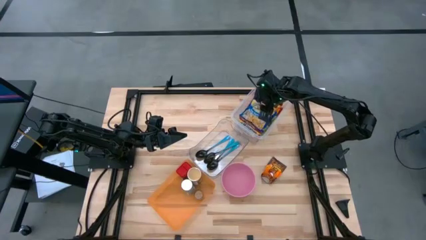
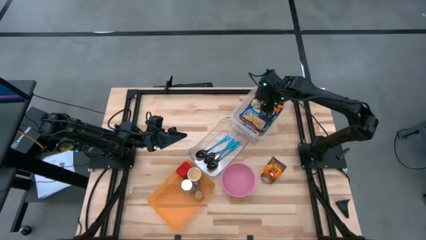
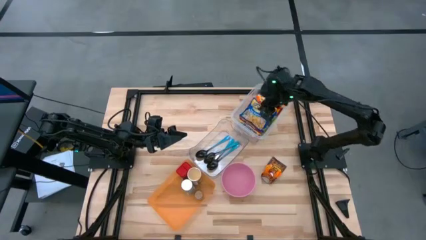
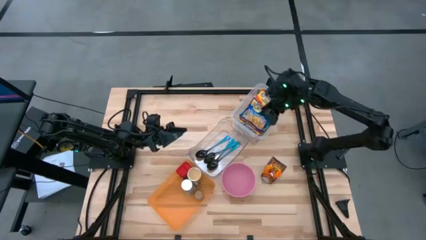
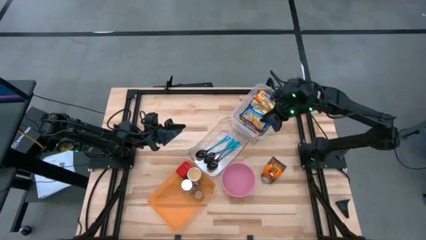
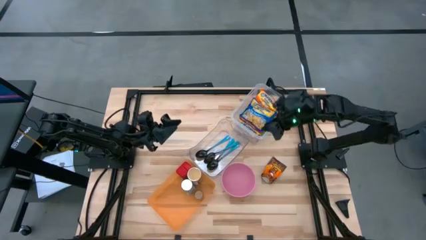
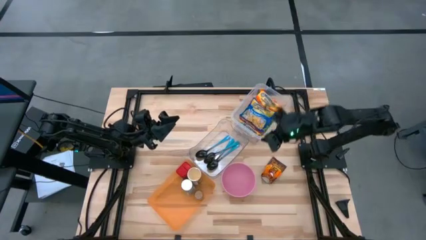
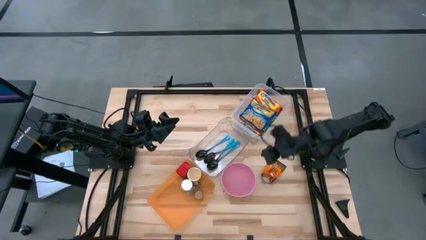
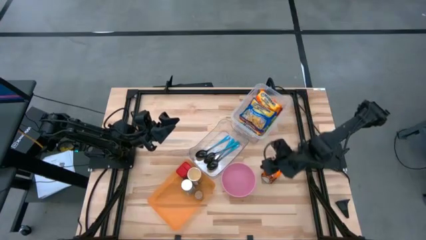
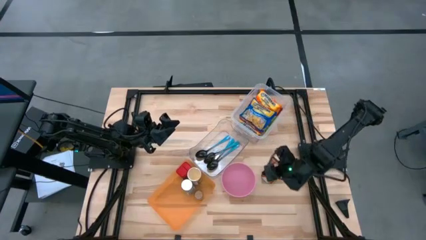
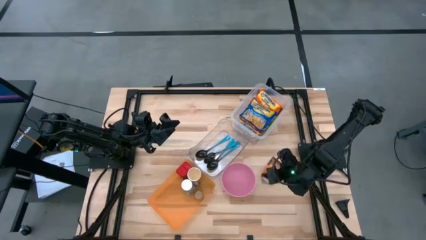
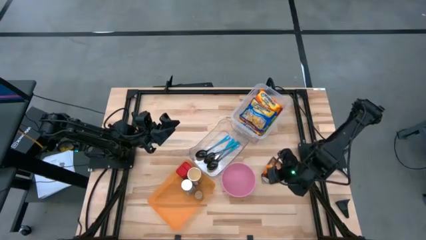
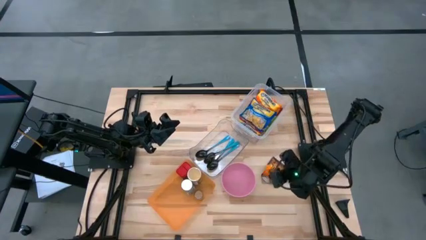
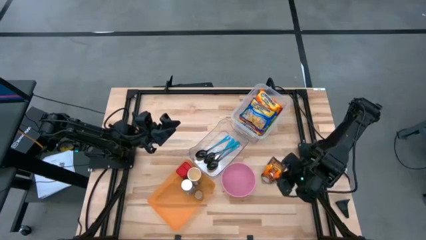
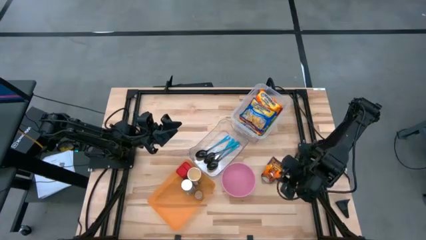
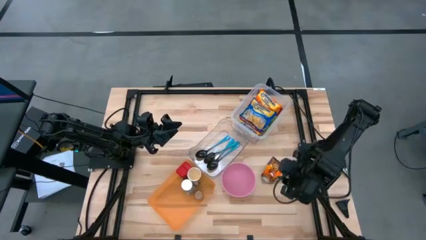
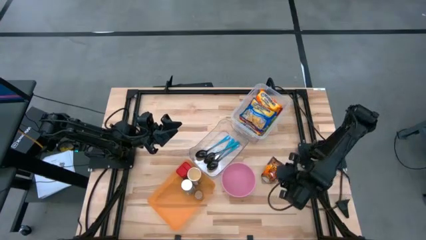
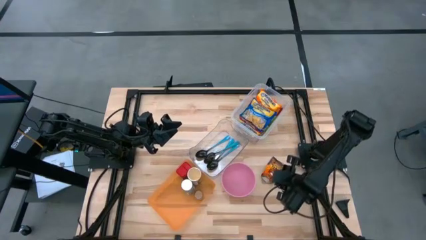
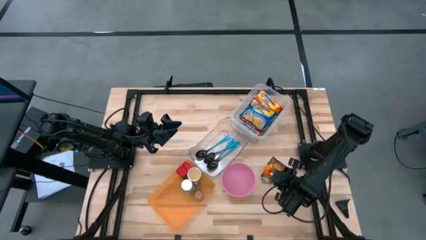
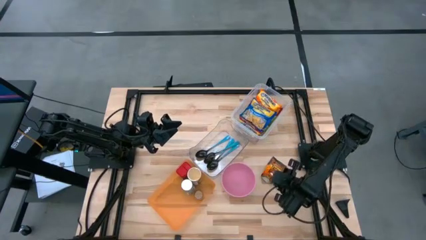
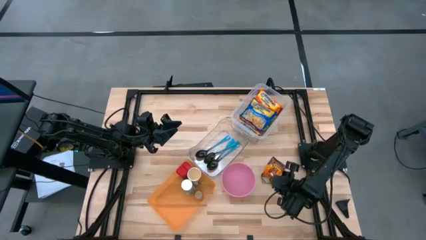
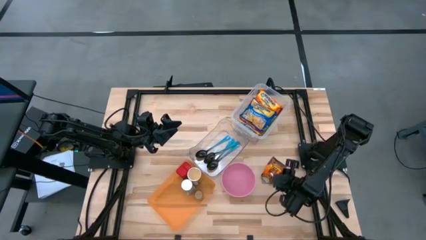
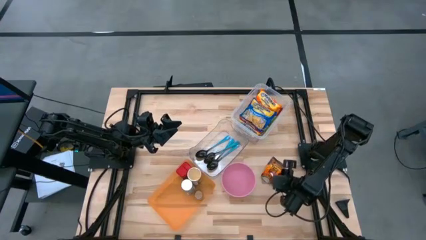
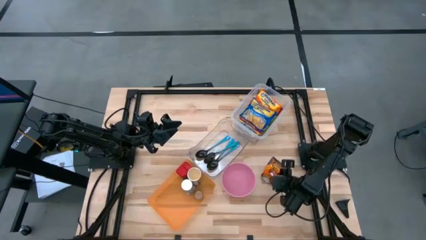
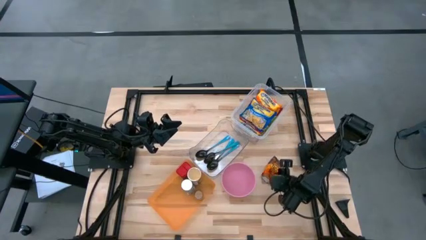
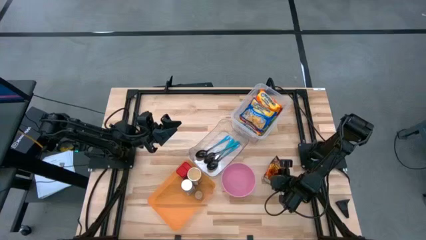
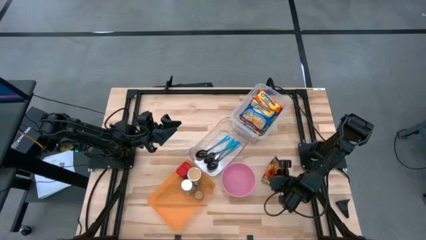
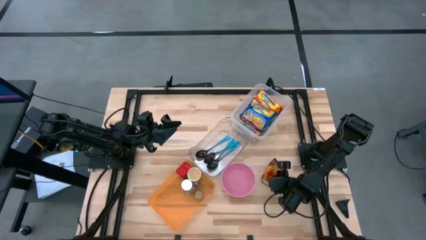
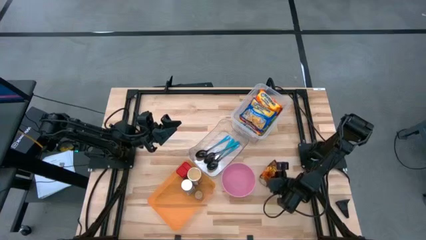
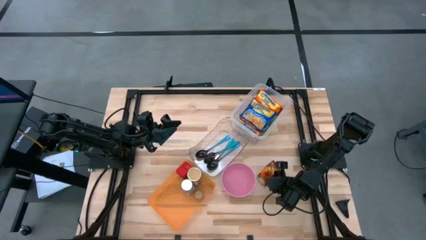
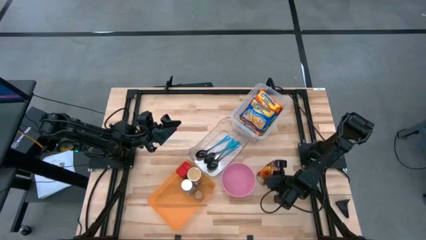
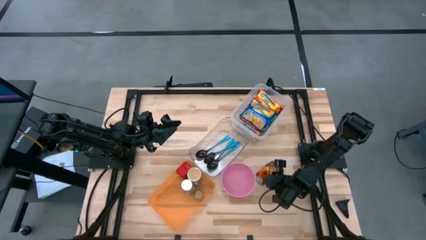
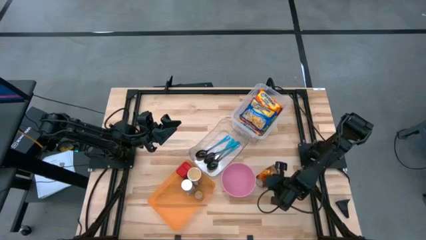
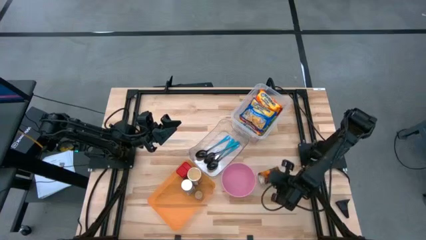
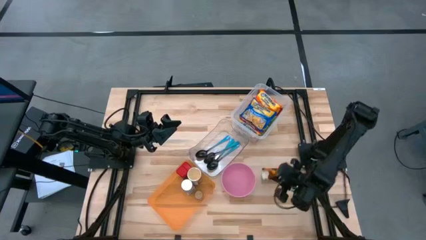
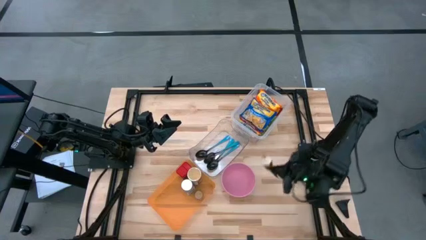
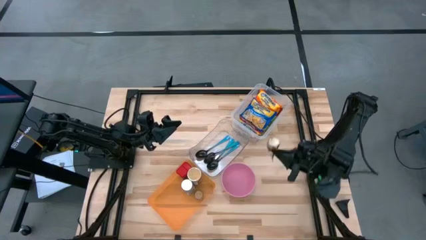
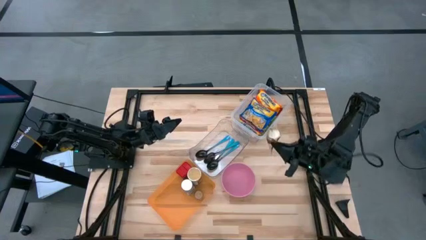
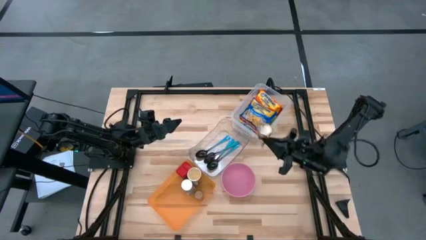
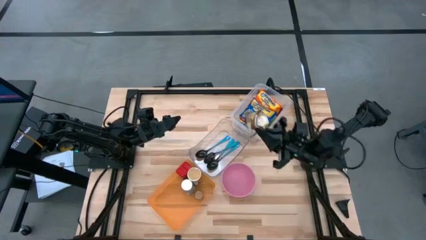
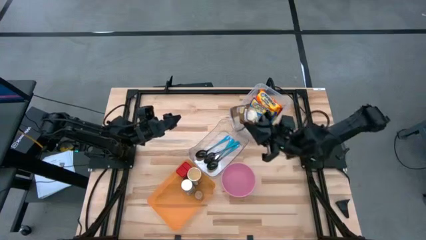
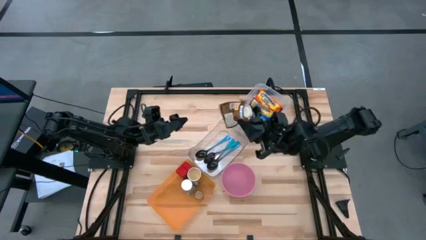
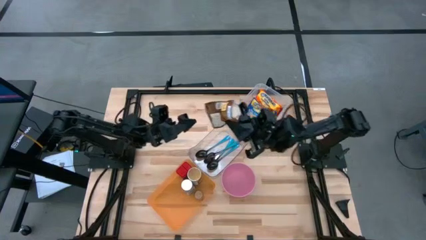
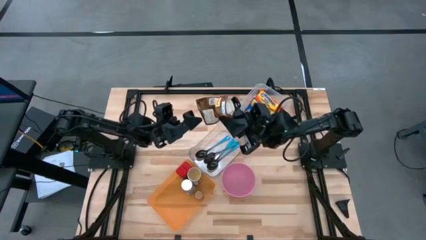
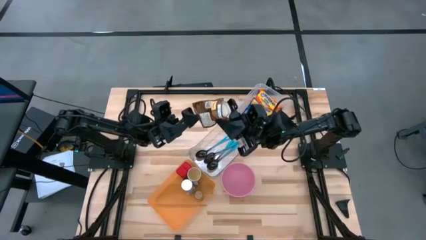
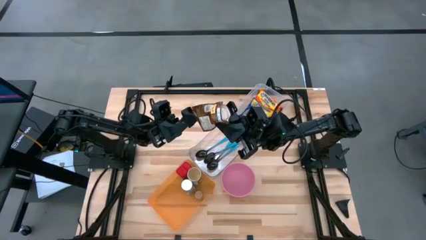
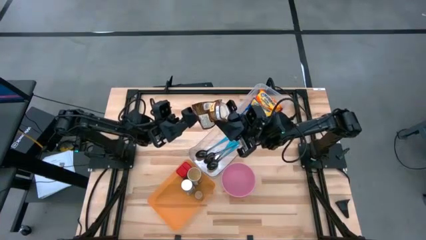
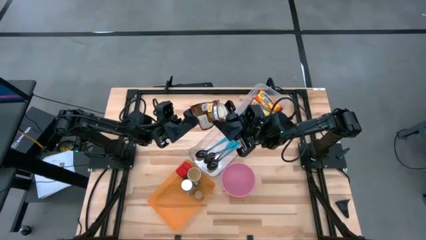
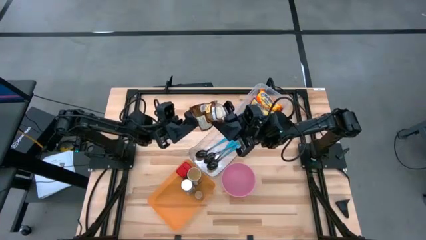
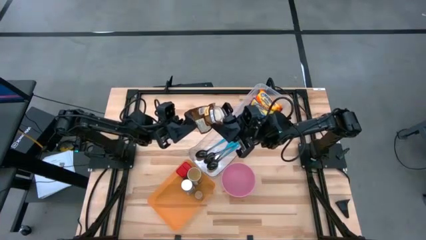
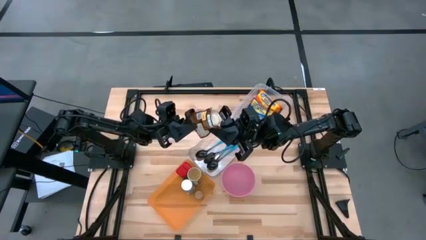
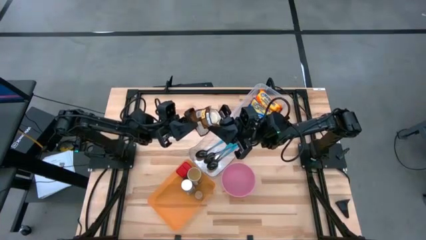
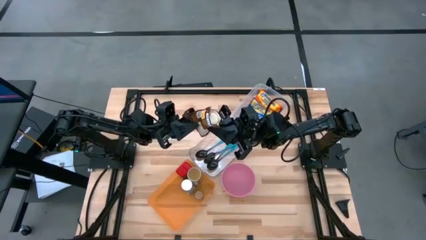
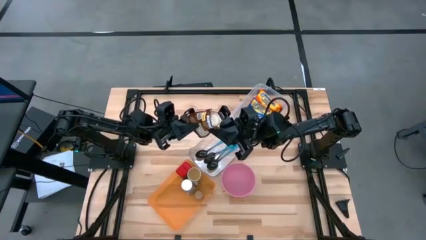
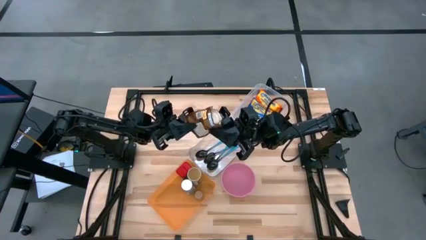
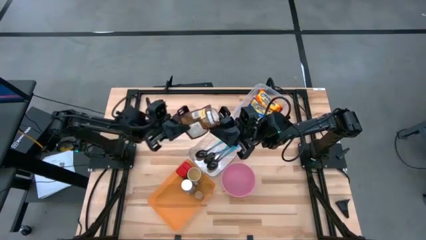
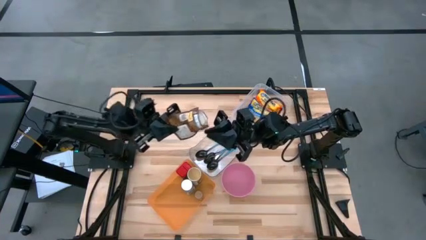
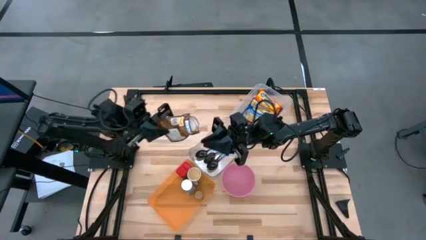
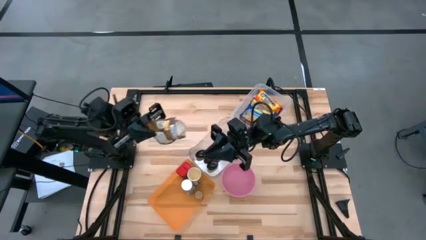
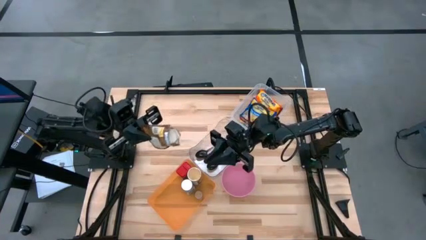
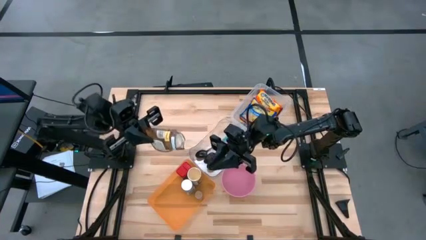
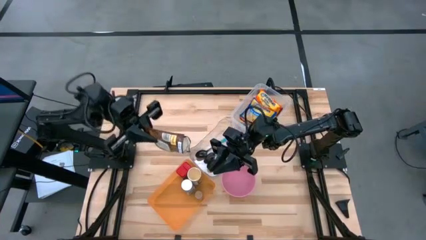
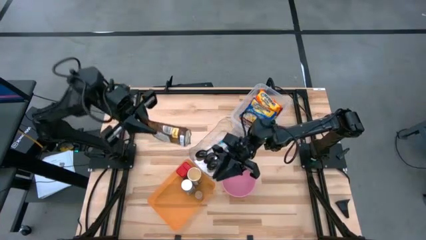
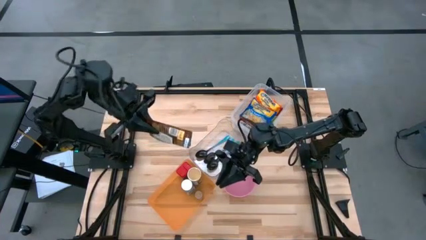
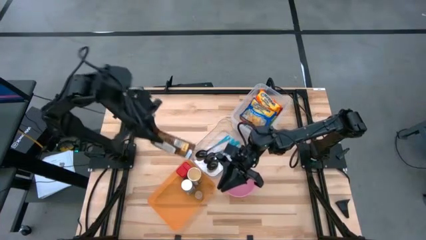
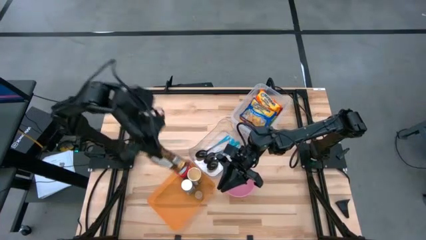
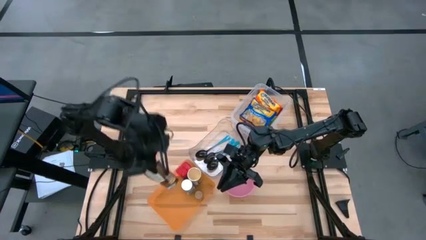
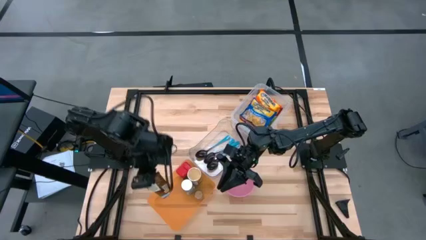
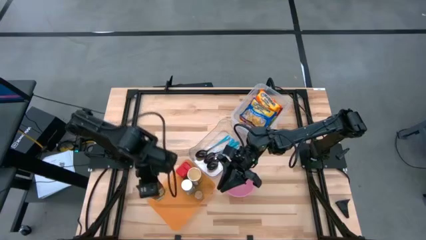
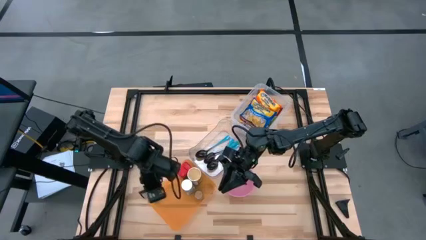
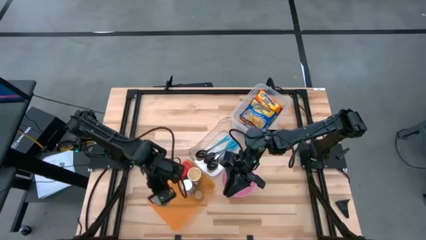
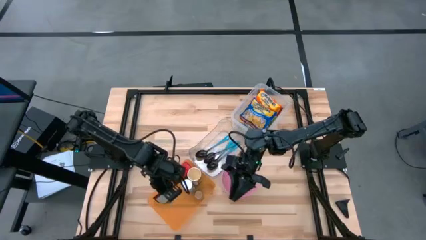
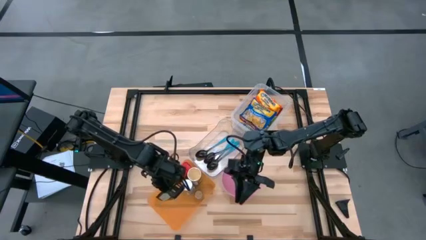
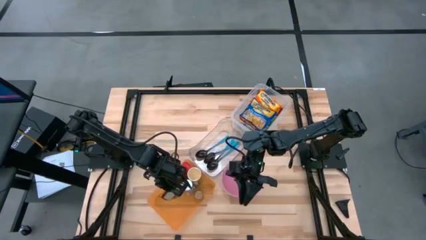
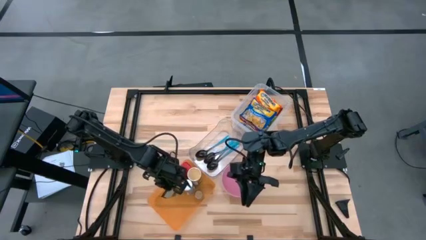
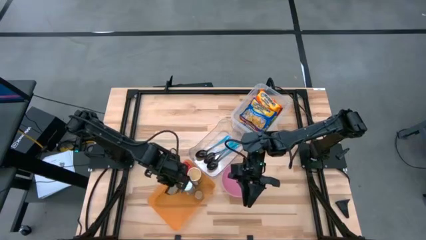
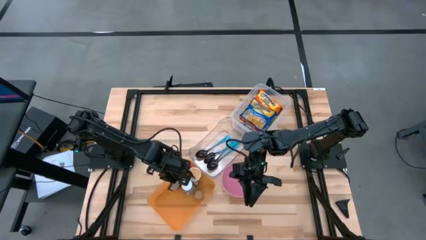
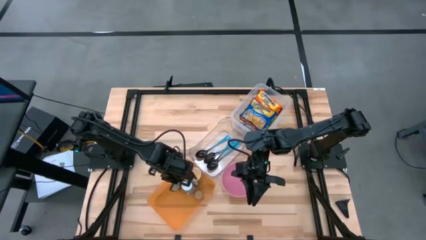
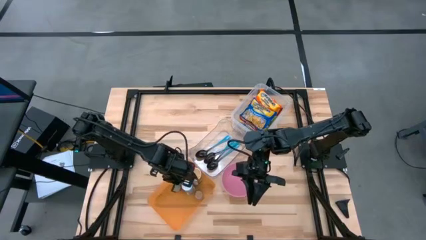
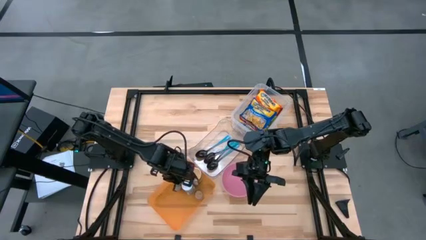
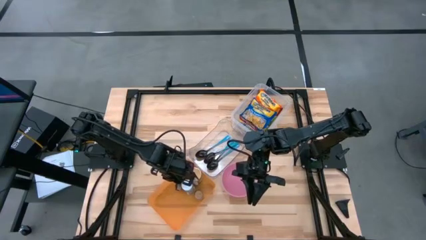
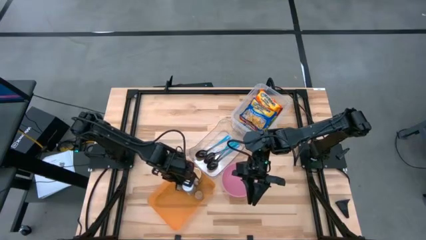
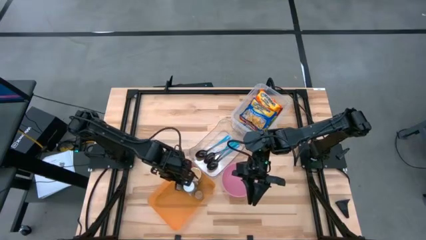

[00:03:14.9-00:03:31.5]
Task: Pick & Place Food Item
Put the orange seasoning bag into the orange bin
